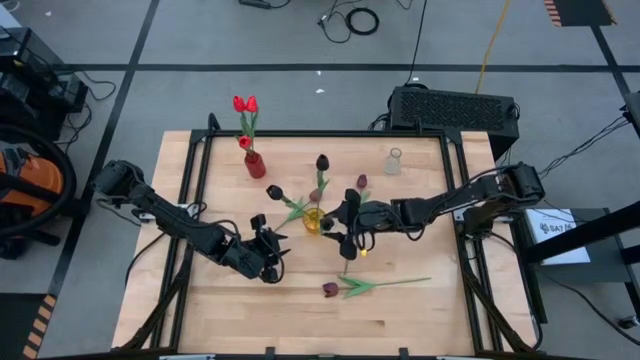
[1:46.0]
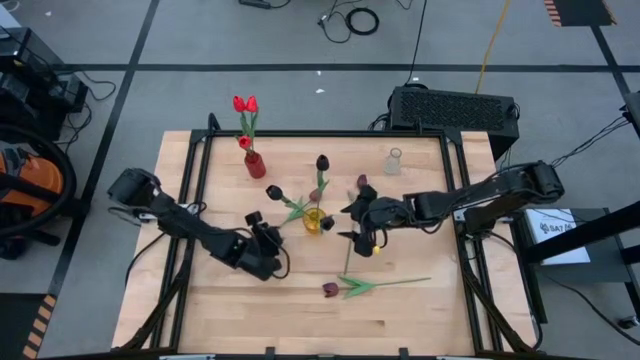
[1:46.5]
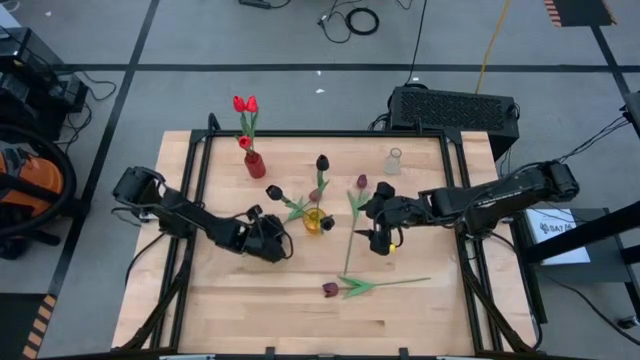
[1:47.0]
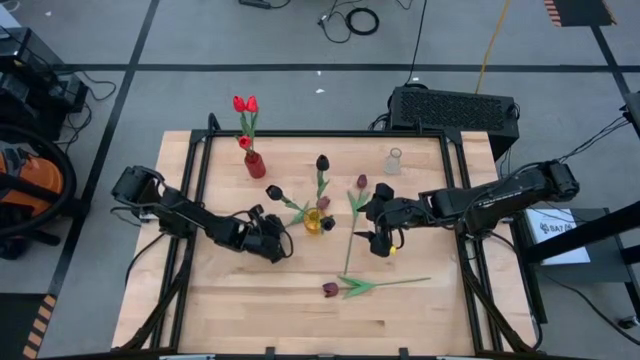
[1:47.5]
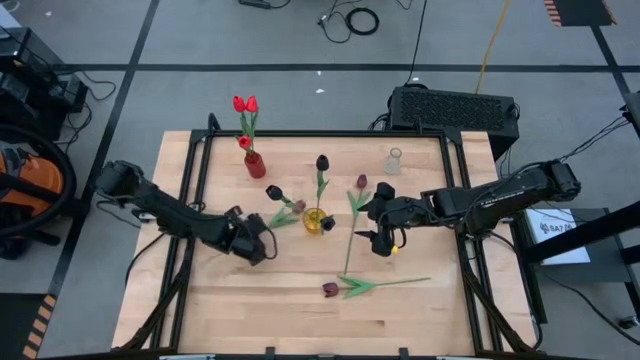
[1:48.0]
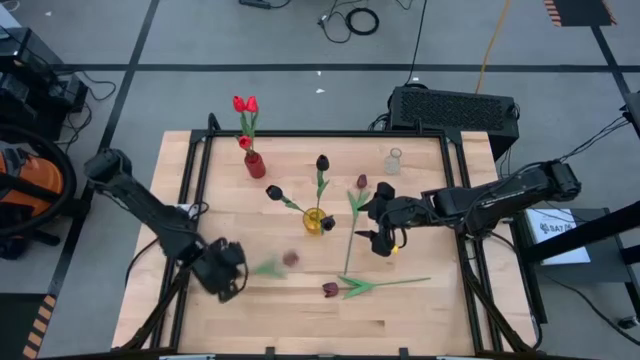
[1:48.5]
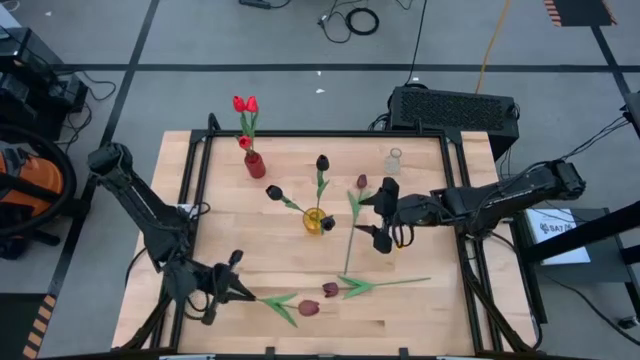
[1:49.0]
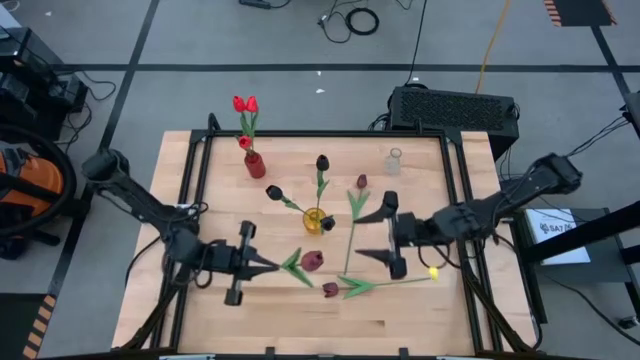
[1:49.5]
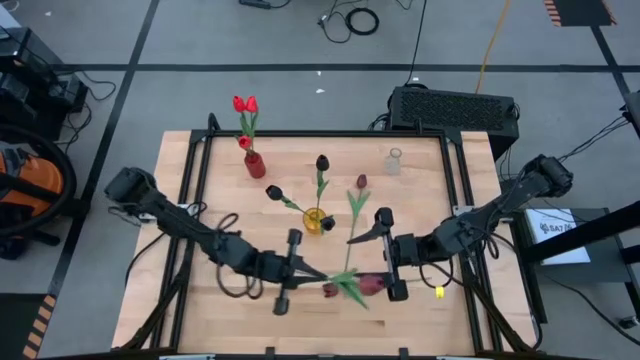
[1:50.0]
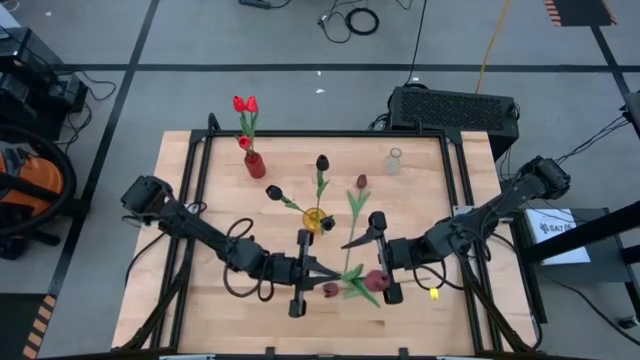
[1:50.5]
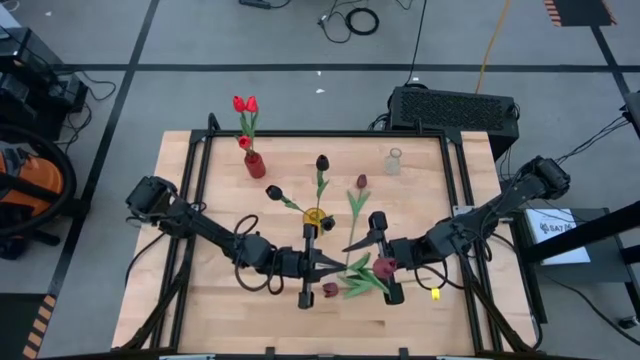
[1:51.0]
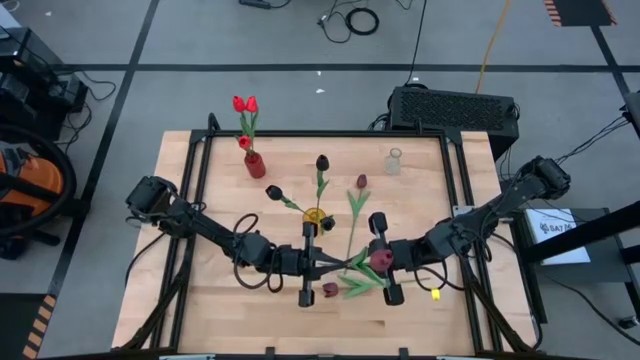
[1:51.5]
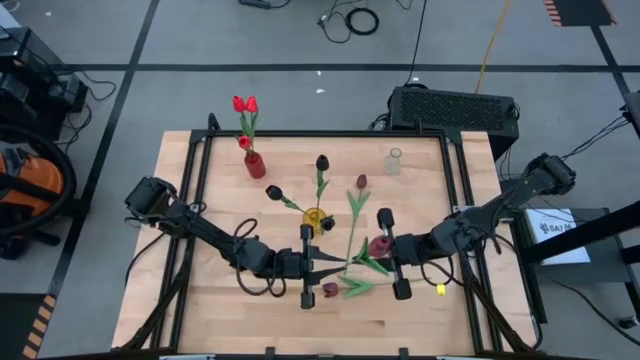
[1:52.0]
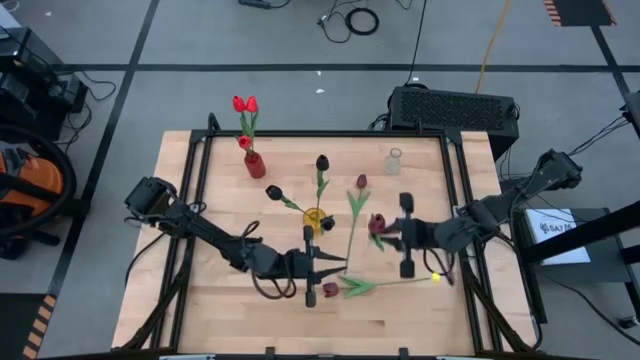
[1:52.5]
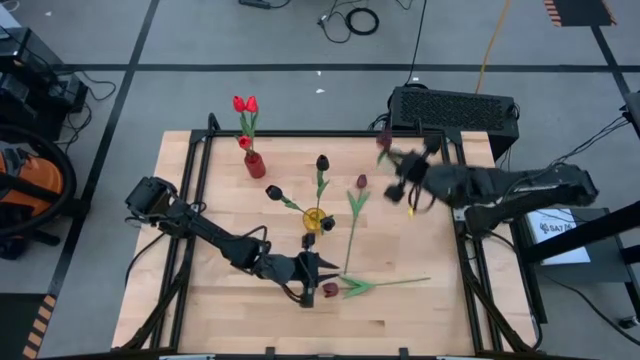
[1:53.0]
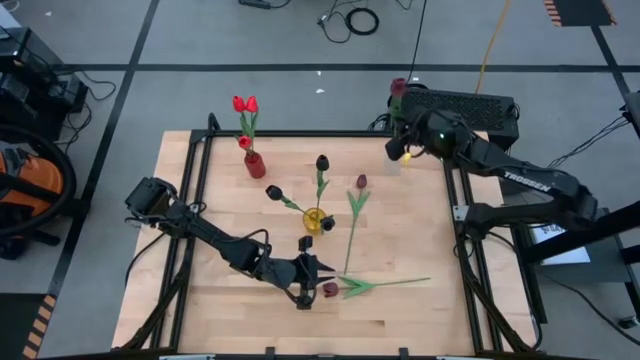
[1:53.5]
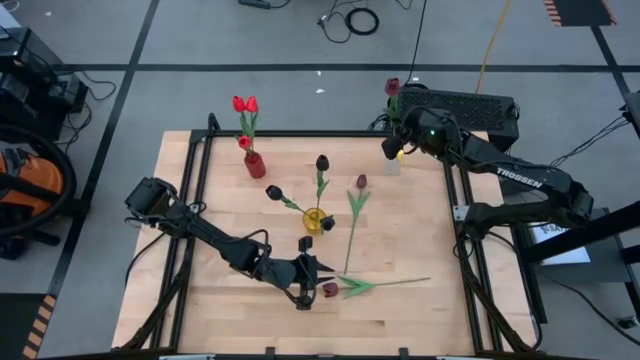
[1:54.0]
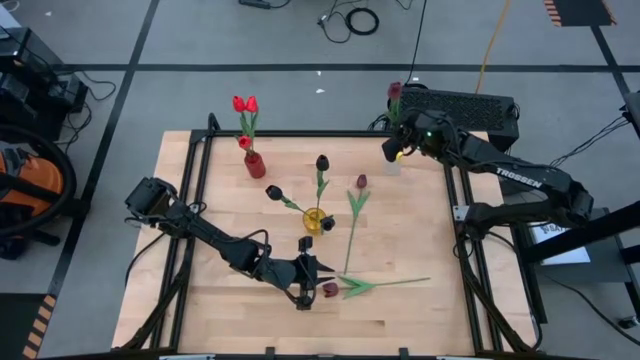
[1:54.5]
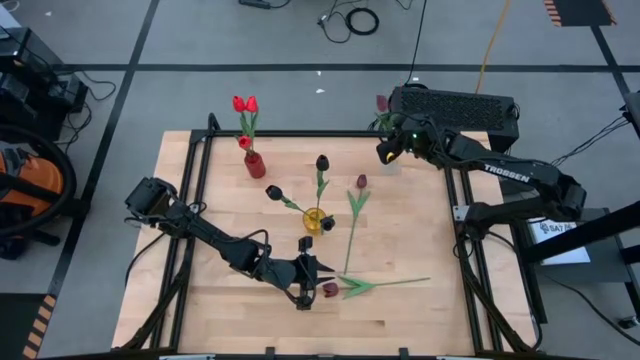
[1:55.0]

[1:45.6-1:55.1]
Task: Sort flowers into vase by color
Put the top left dark red flower into the transparent vase

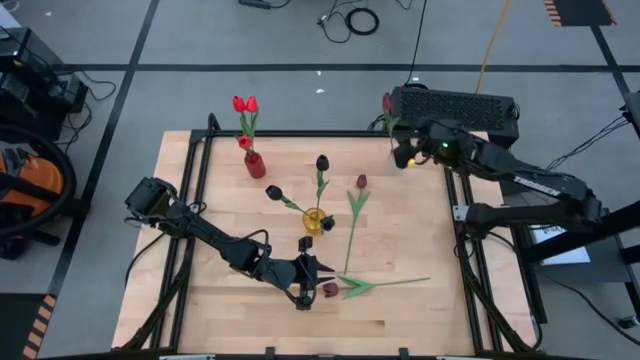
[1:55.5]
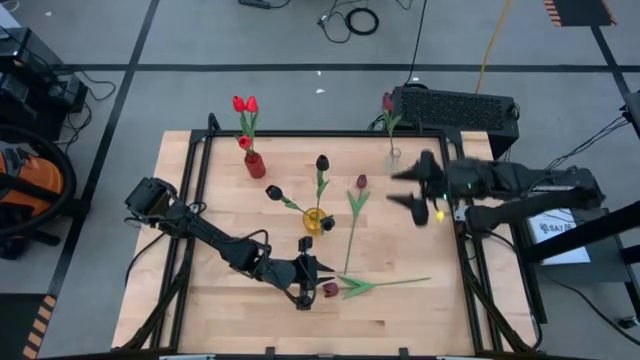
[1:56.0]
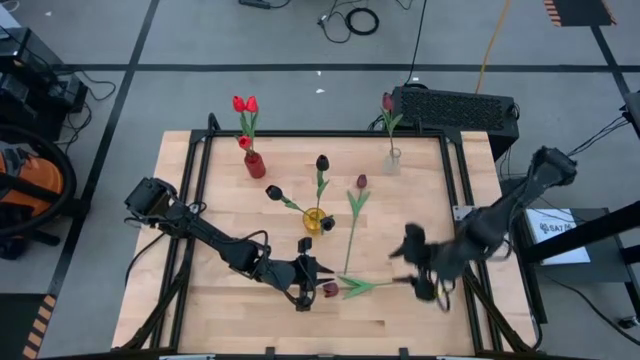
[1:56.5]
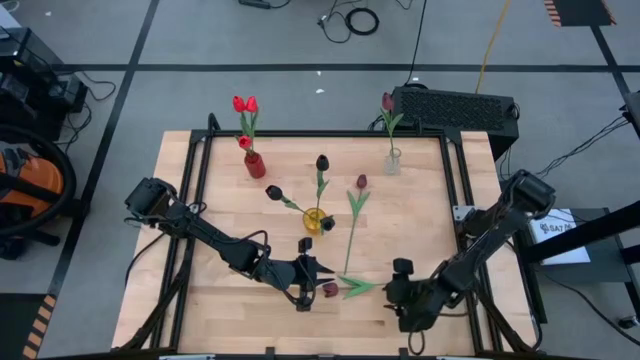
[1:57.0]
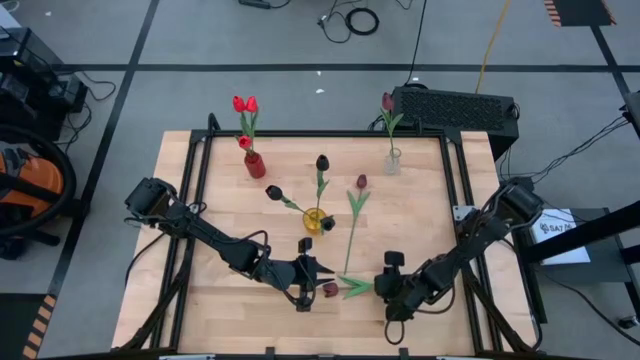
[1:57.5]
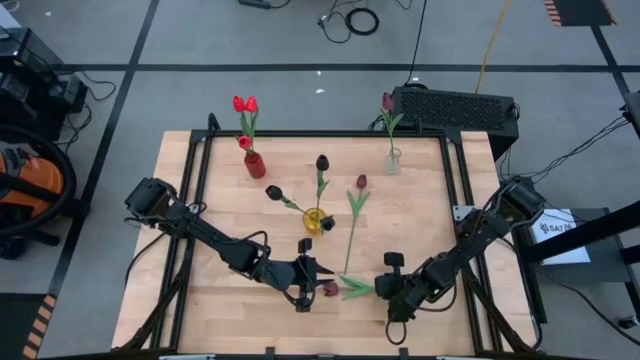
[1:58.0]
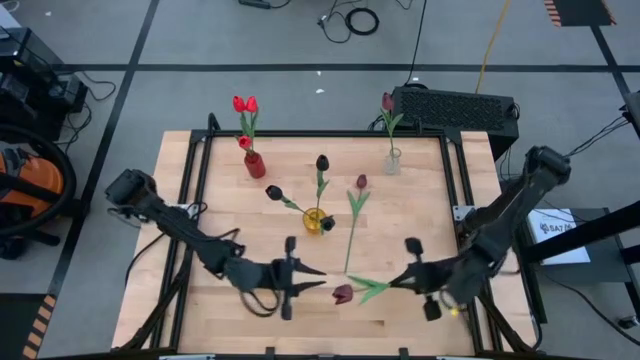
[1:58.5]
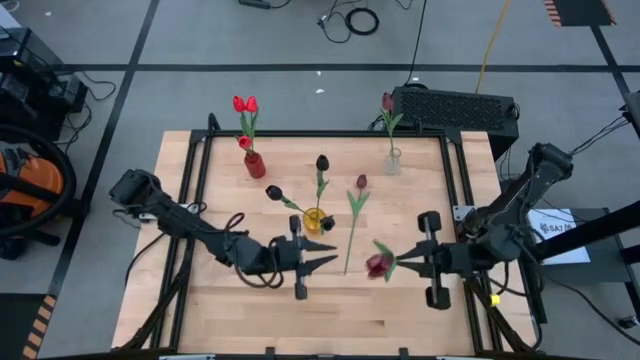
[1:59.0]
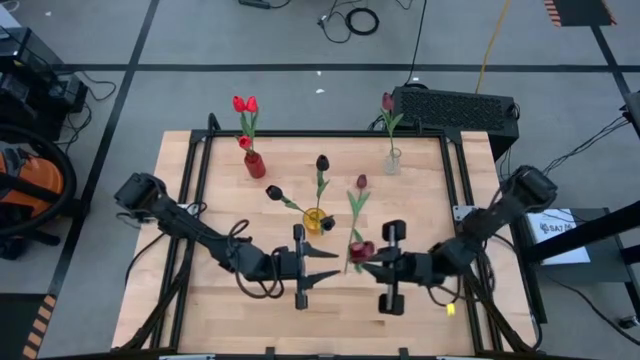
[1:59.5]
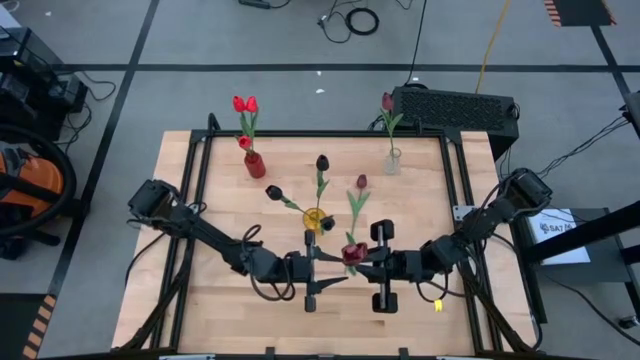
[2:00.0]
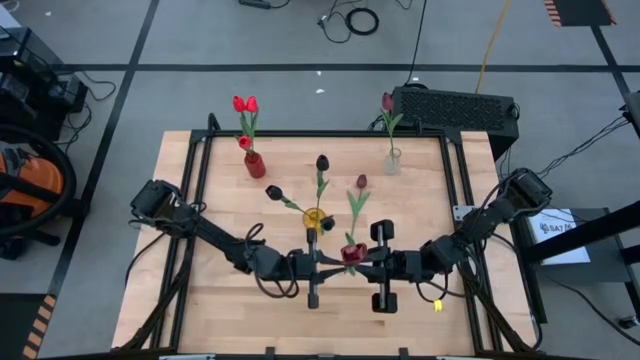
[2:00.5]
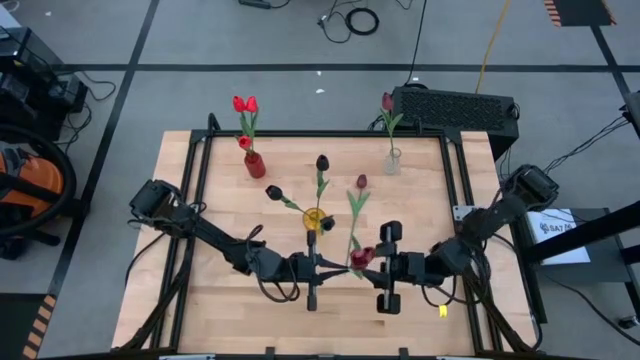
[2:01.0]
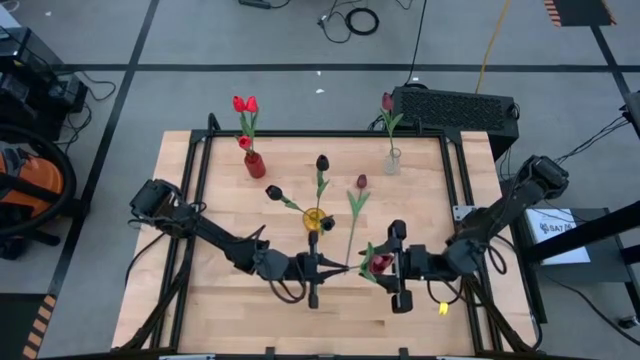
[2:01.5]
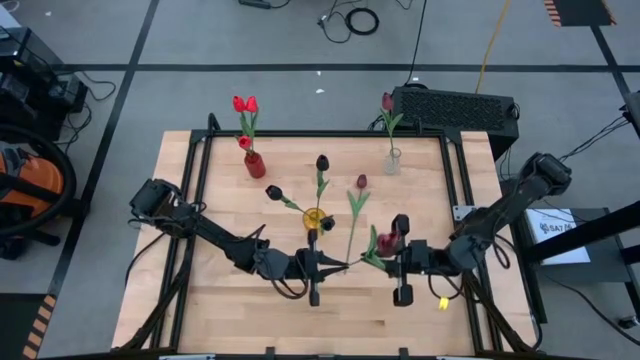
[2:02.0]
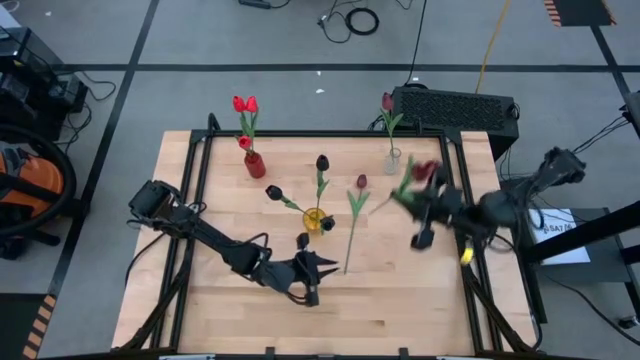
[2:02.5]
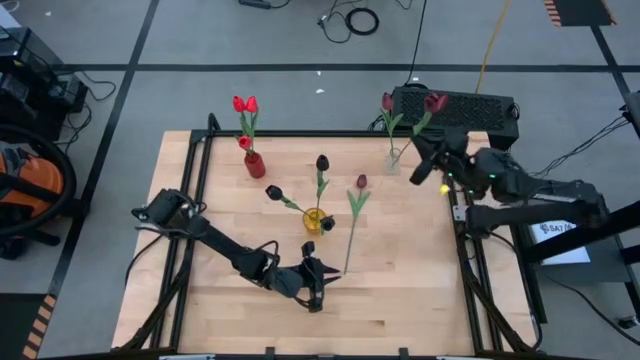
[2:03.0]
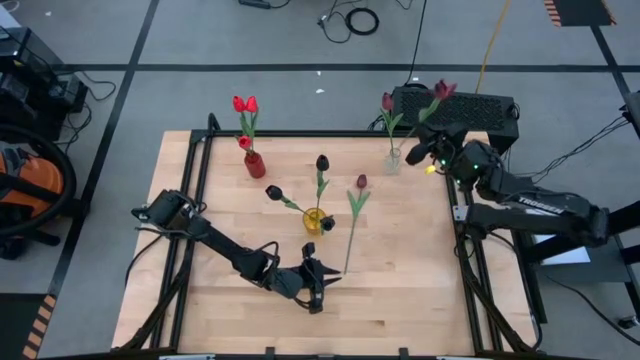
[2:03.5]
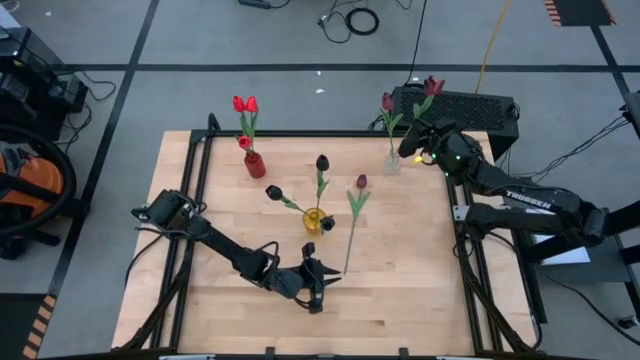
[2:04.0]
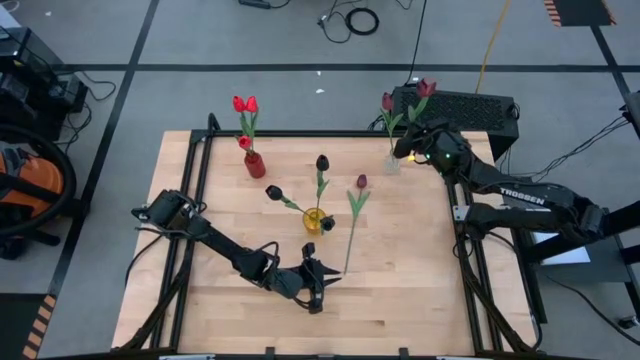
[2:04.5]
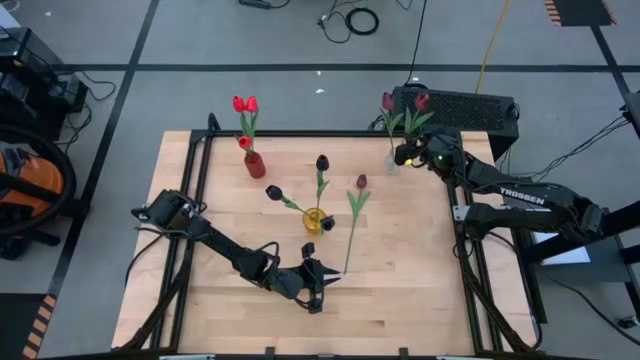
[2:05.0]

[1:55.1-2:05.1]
Put the bottom dark red flower into the transparent vase

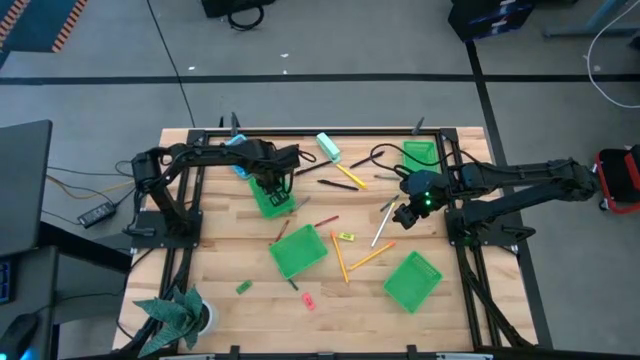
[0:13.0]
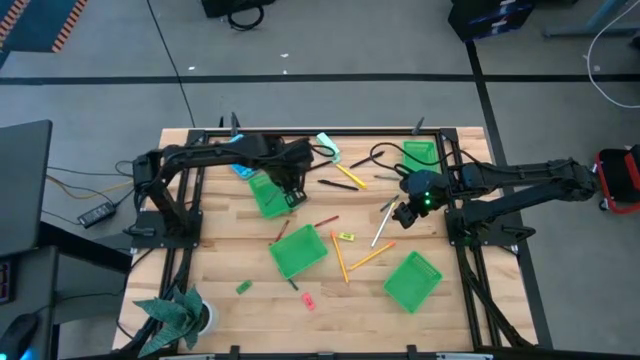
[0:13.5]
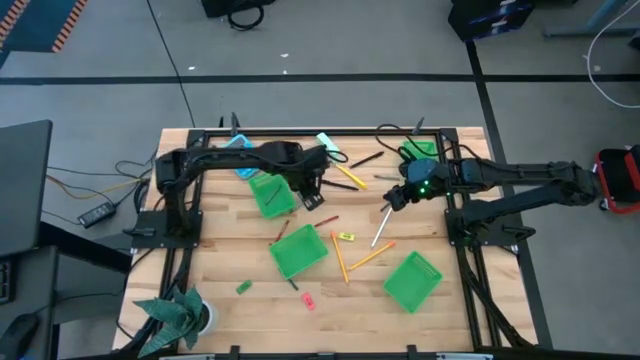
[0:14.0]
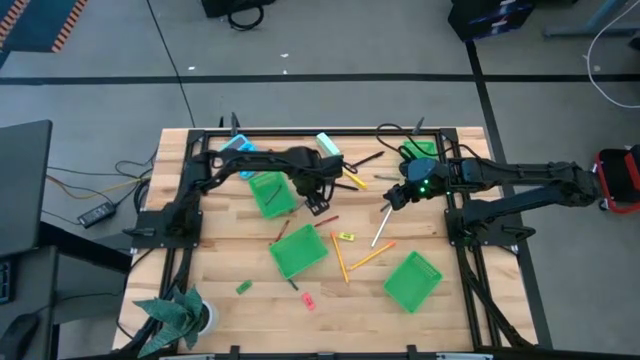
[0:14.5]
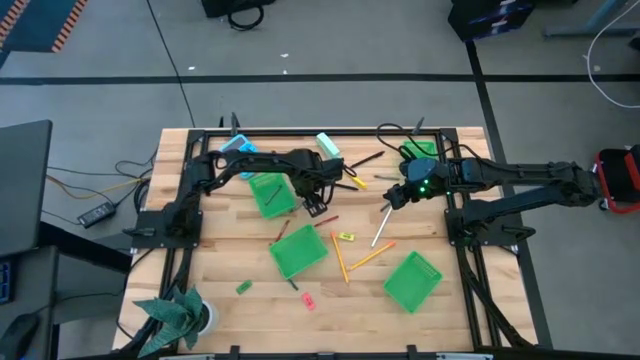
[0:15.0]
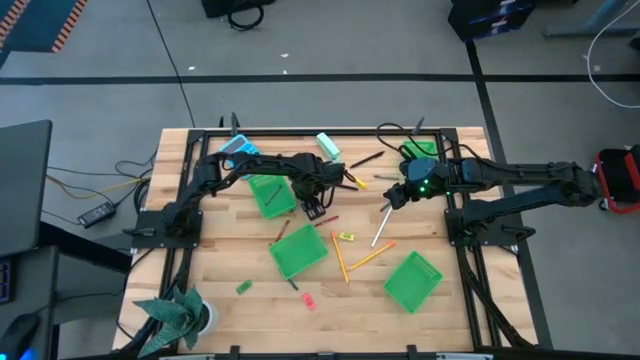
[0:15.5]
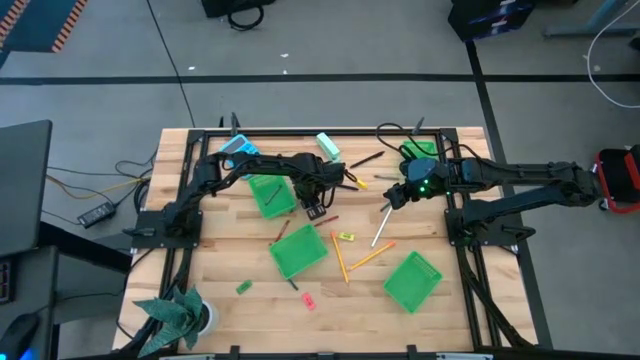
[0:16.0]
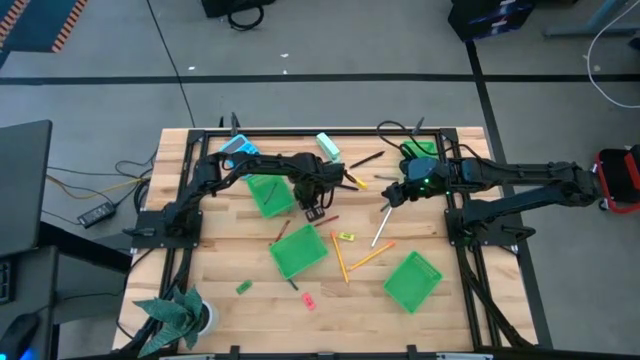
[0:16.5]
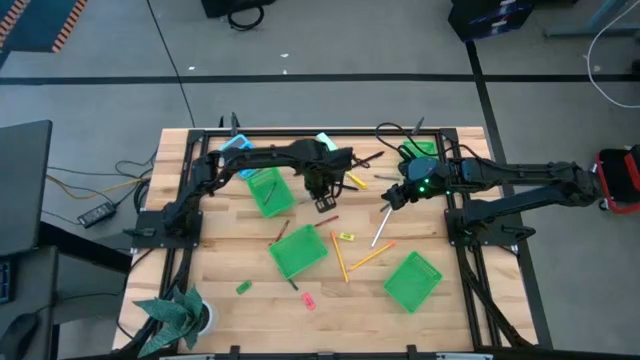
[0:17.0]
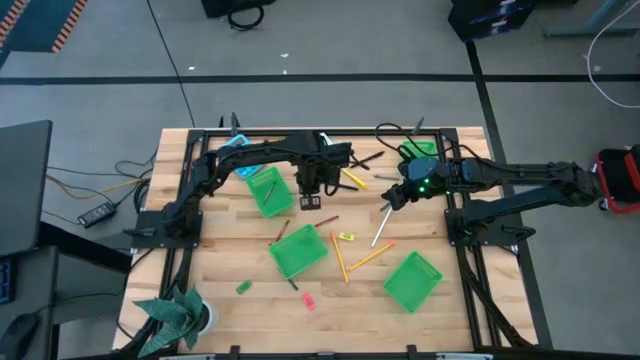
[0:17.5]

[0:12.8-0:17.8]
Task: Sort crayons/erasers/pens/pencils in bins
Put the bottom gray crayon into the top left green bin
